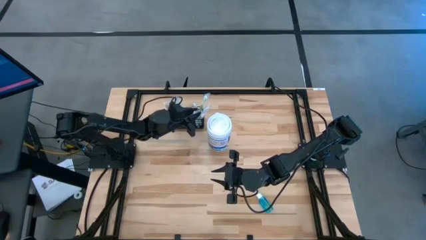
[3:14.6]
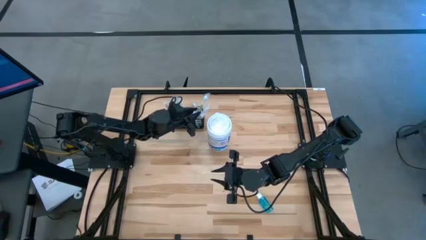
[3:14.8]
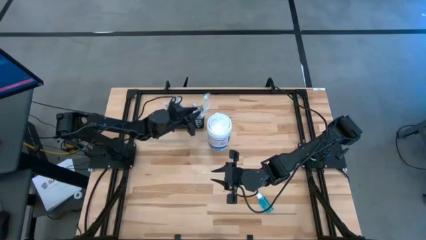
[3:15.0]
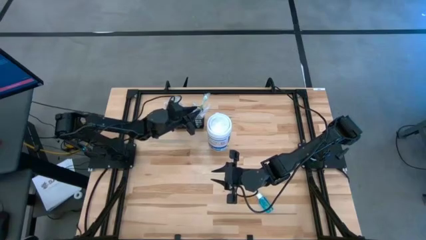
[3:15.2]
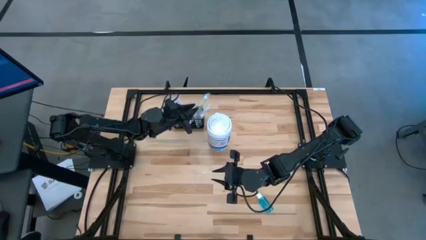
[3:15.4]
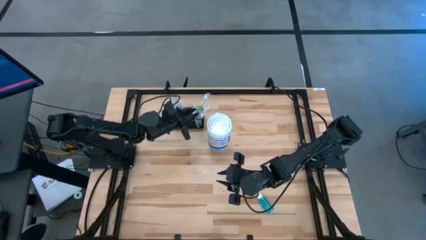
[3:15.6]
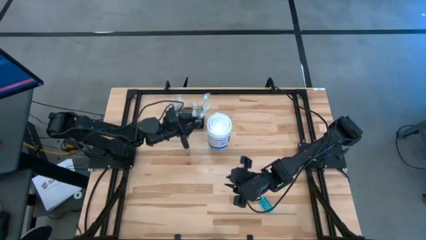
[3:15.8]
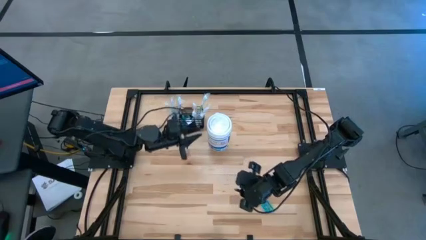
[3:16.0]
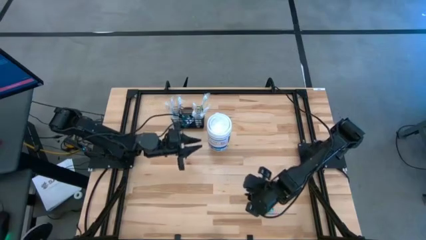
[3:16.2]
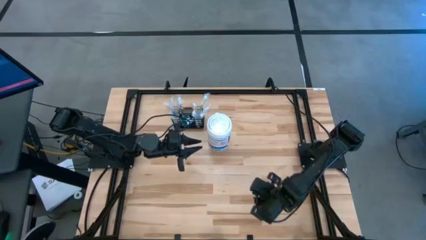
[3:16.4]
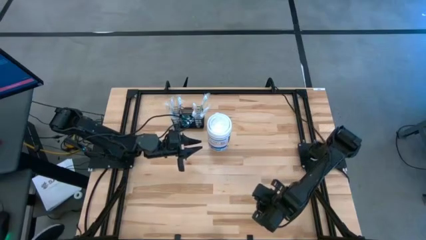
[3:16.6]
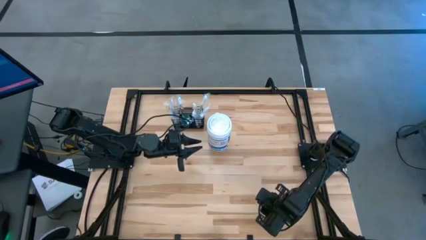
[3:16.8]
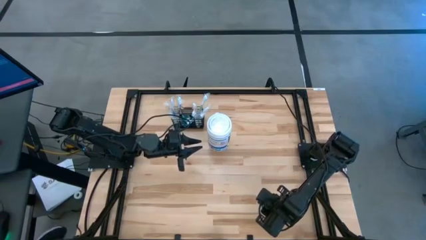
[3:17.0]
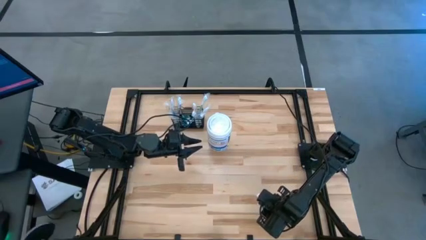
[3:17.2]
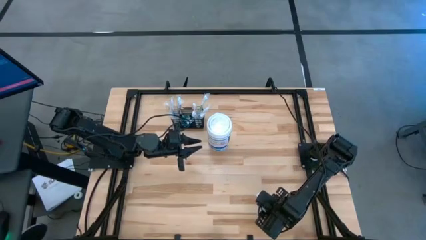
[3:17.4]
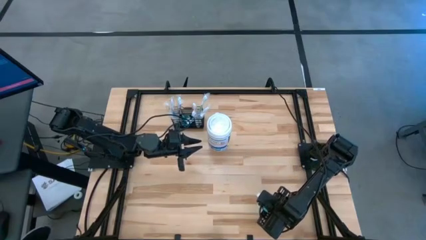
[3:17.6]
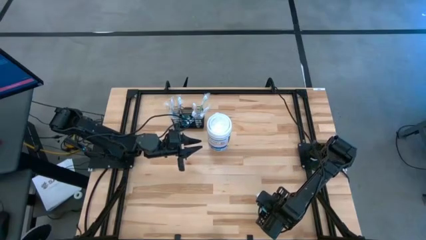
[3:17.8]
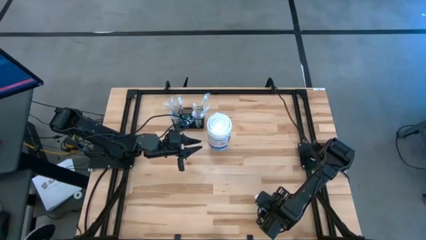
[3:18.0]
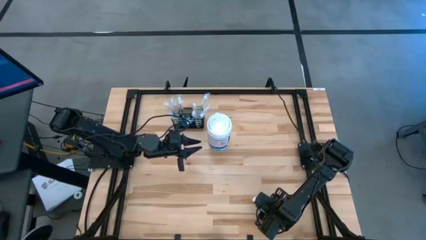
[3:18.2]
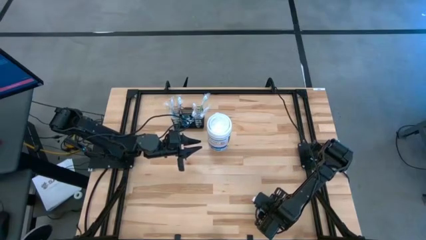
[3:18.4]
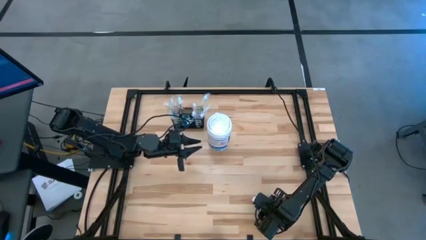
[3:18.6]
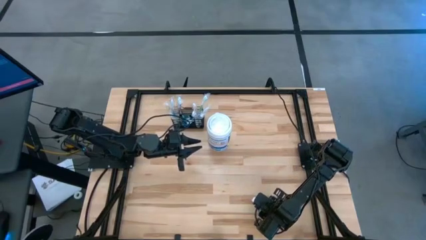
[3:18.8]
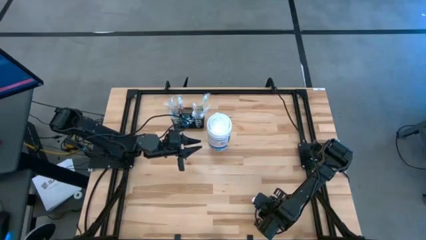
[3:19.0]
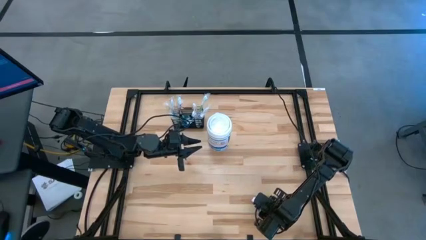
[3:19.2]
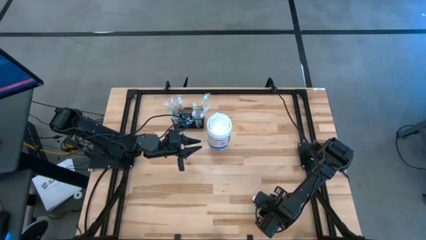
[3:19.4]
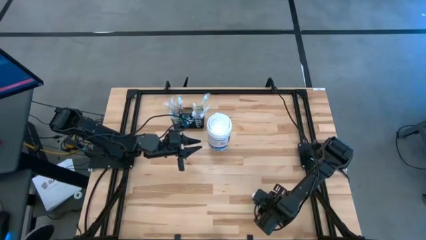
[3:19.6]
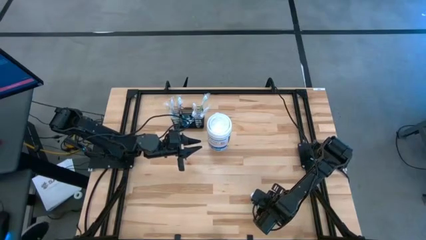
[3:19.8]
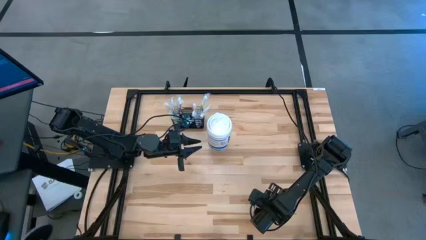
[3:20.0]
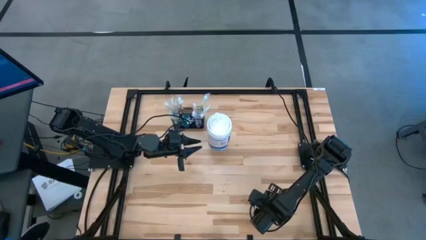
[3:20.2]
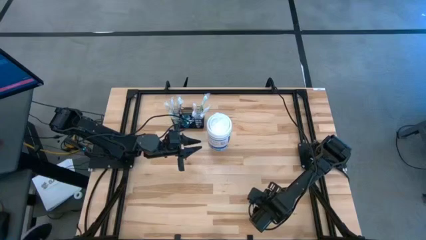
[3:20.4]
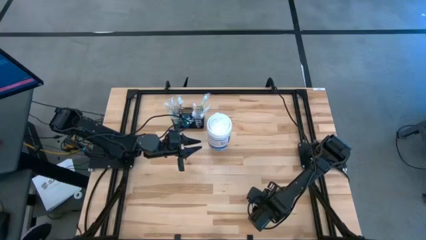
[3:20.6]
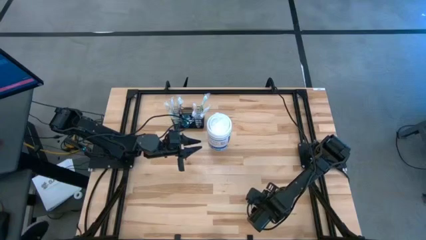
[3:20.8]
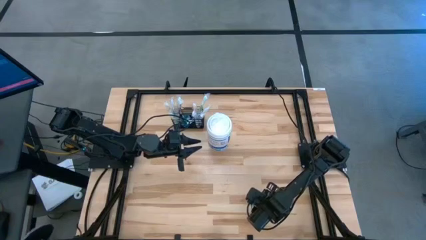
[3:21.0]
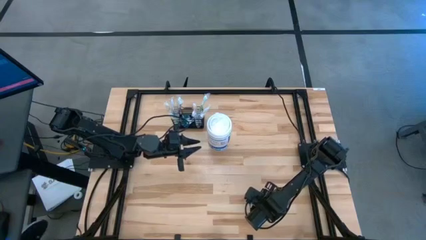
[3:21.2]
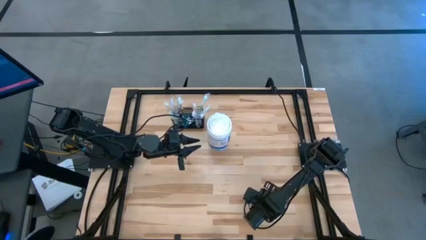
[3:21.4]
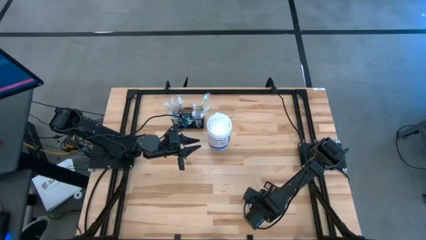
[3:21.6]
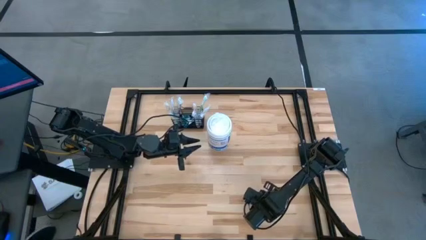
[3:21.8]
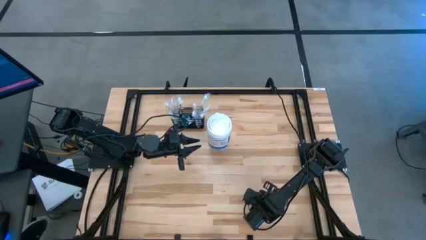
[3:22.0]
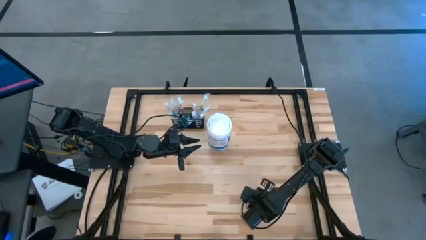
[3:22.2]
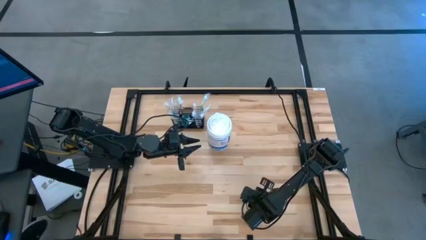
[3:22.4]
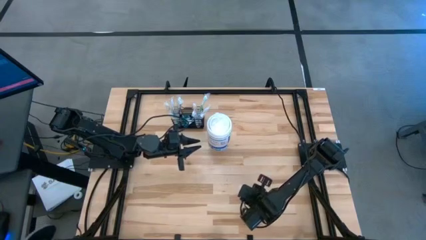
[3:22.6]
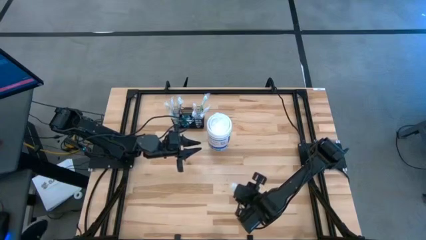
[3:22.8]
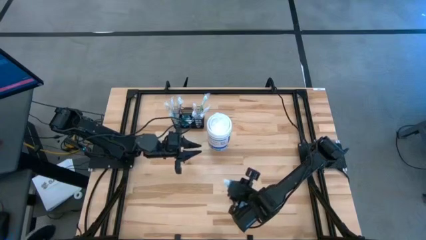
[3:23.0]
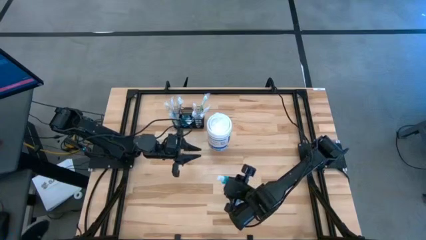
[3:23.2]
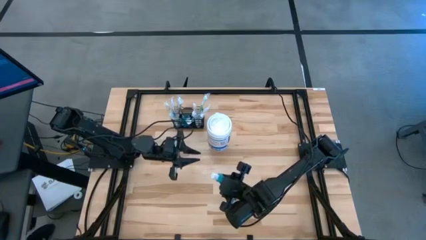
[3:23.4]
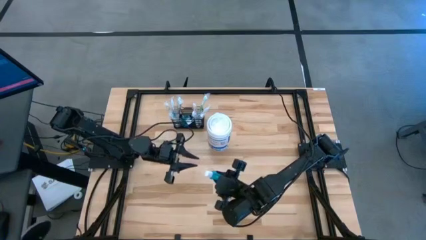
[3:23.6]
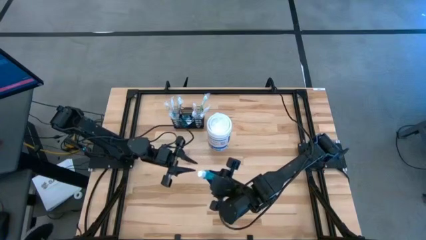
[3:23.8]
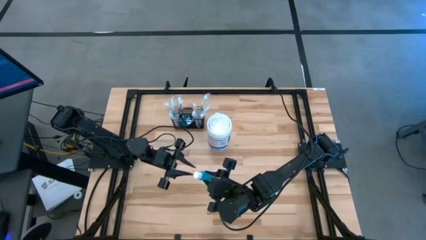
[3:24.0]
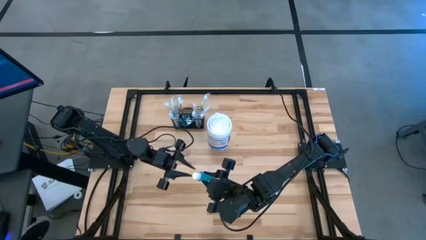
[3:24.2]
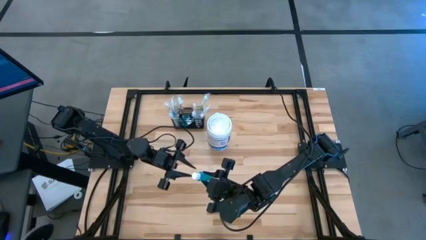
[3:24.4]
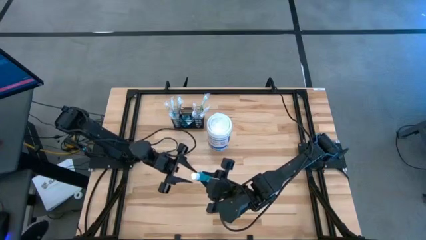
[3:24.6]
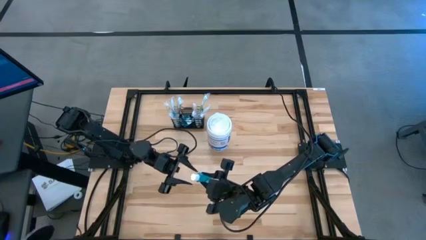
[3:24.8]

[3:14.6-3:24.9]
Task: Pick & Place toothbrushing station
Put the blue mouthwash into the mesh organizer

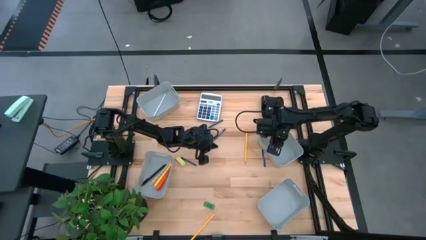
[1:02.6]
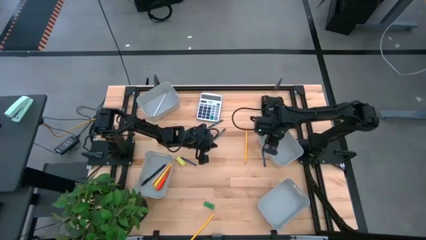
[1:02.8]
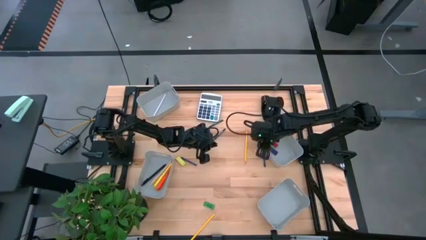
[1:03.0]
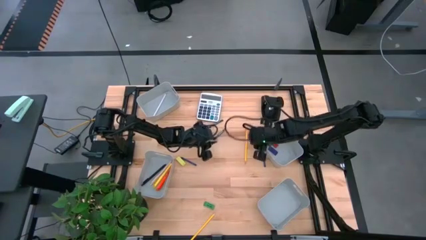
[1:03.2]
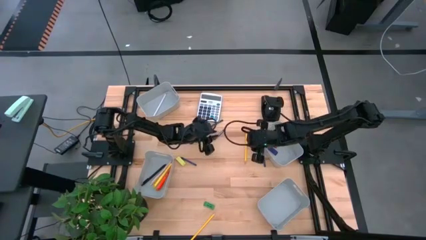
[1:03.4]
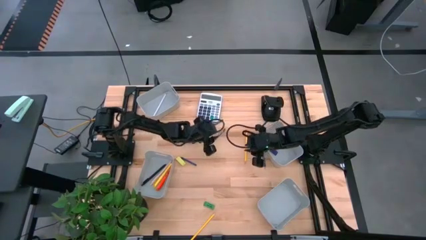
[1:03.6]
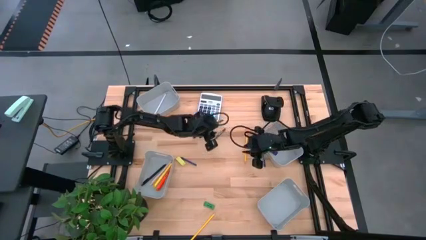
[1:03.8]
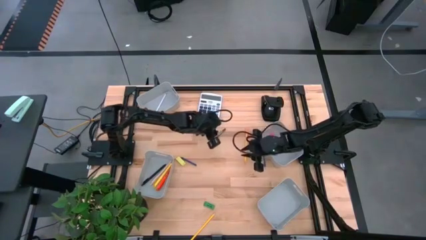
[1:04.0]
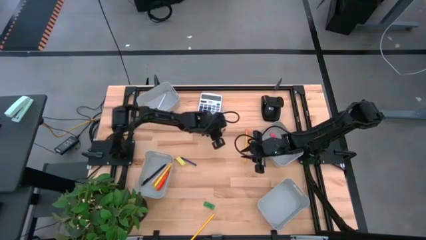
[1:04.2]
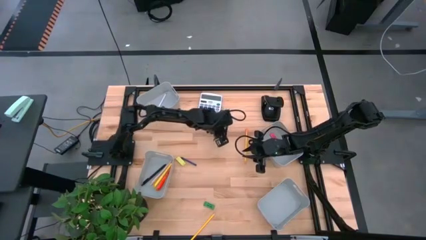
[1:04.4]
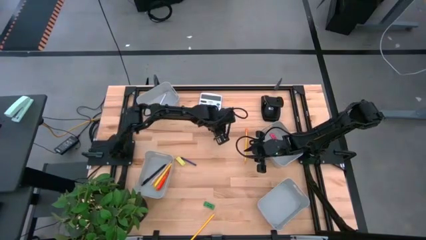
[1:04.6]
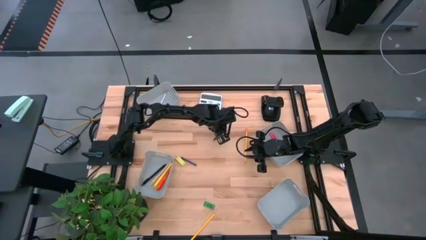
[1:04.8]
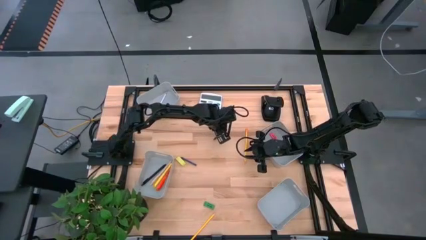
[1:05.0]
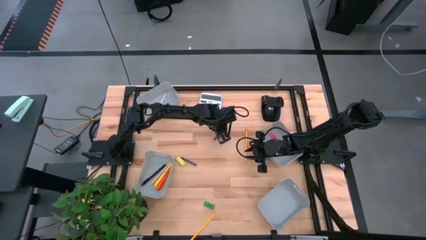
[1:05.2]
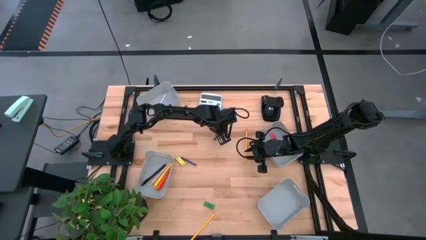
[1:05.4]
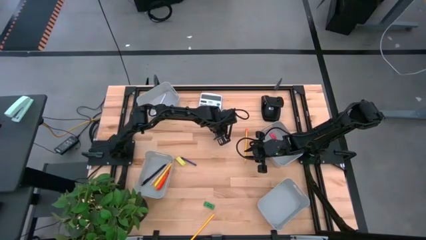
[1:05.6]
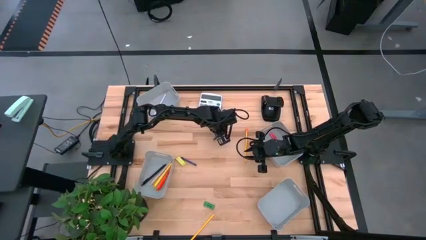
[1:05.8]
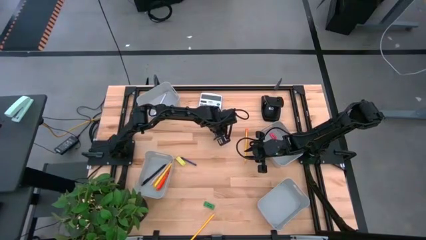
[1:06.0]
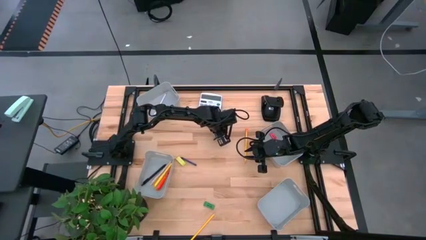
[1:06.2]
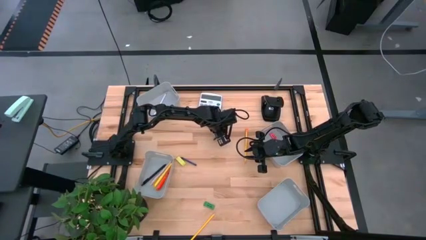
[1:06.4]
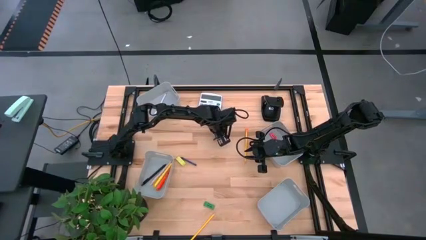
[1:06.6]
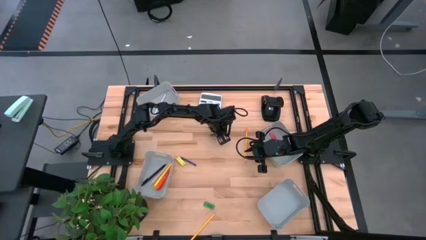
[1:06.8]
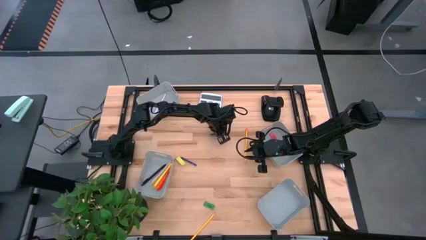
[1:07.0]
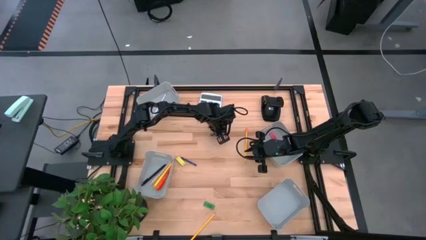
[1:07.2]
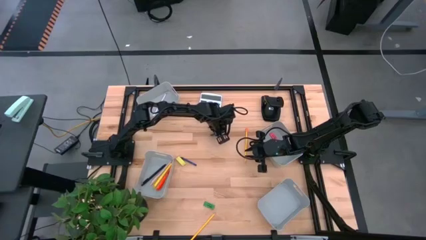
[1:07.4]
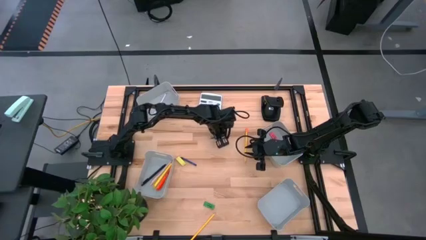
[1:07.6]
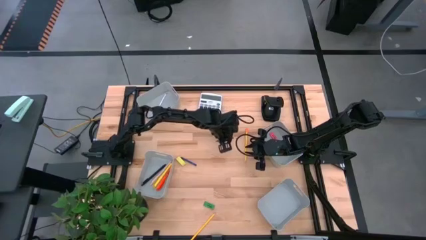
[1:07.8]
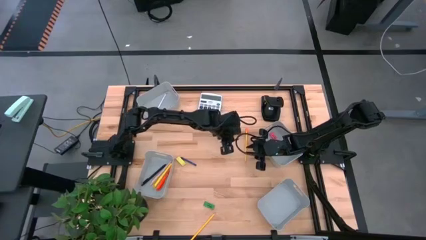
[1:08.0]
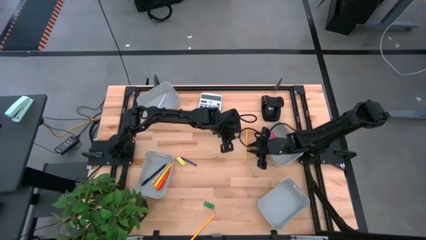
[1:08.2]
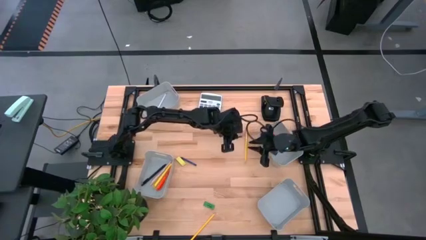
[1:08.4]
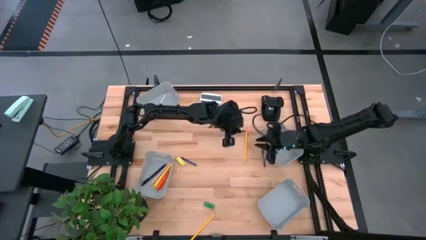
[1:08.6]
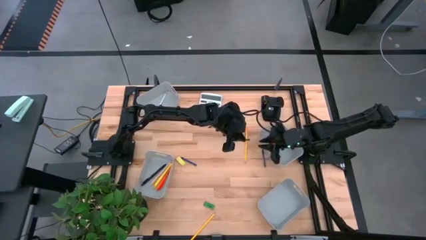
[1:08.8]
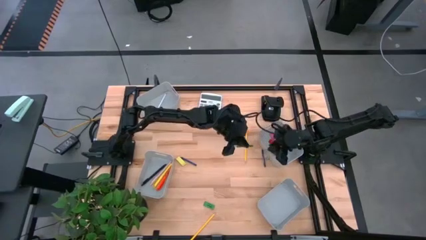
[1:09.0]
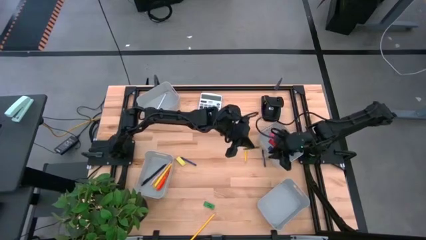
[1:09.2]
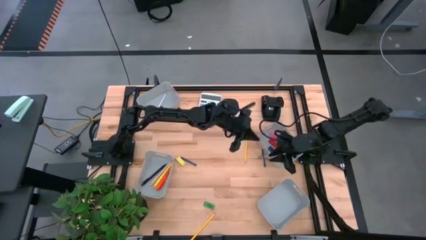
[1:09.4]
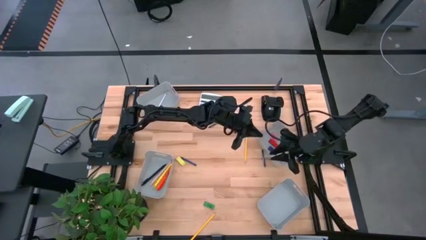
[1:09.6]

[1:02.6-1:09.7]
Task: Sort crayons/erasers/pens/pencils in bins
Put the bottom green crayon into the bottom right gray bin
